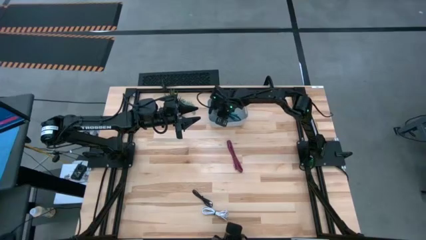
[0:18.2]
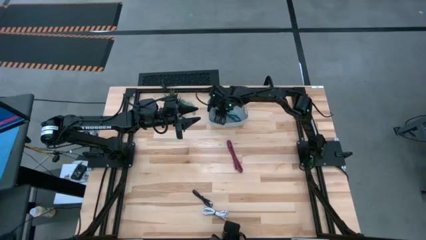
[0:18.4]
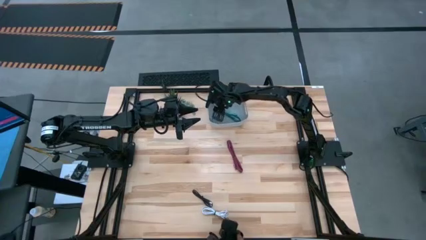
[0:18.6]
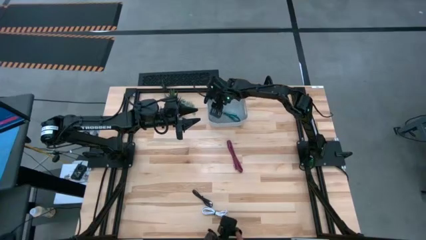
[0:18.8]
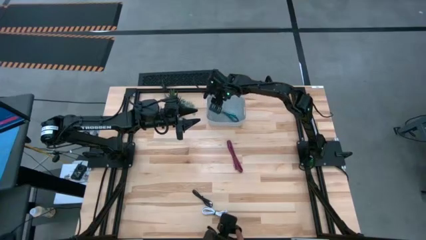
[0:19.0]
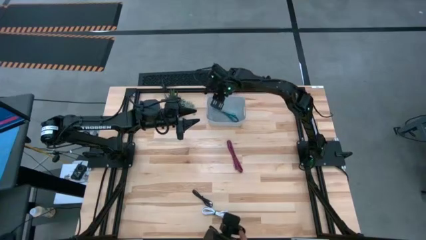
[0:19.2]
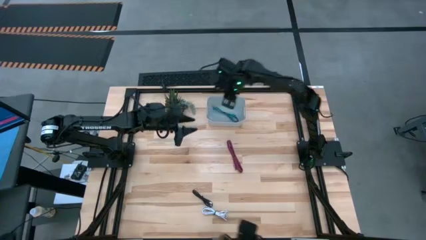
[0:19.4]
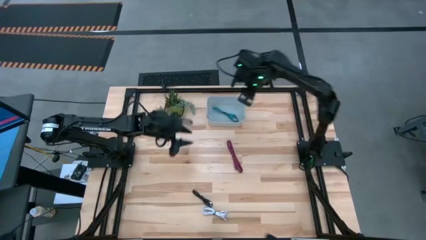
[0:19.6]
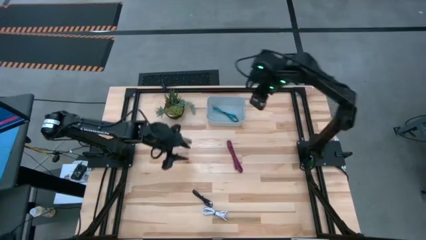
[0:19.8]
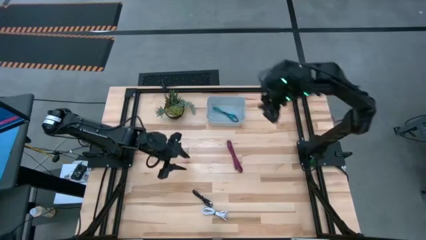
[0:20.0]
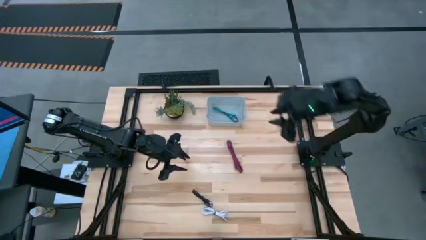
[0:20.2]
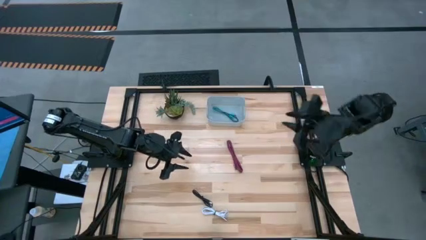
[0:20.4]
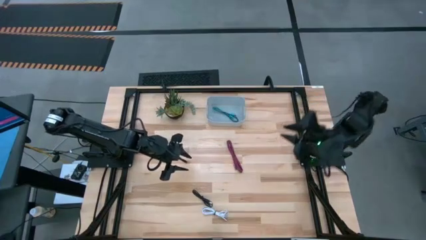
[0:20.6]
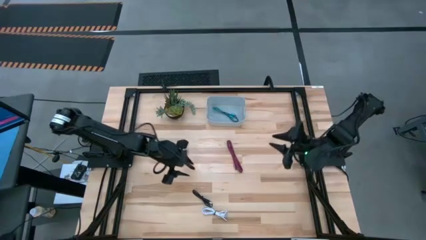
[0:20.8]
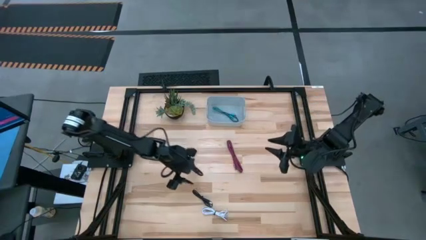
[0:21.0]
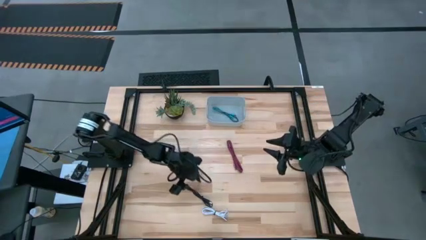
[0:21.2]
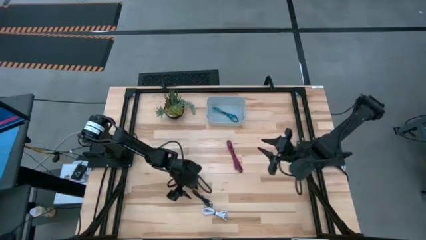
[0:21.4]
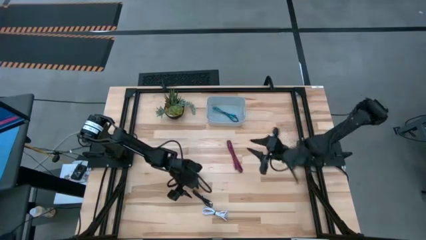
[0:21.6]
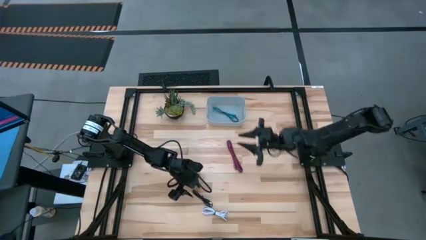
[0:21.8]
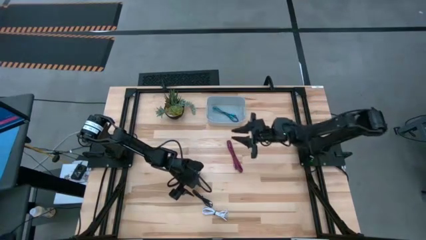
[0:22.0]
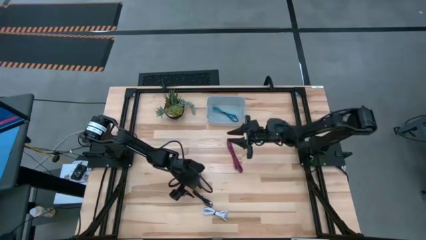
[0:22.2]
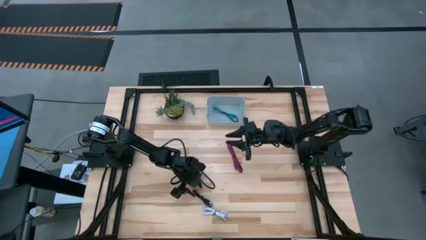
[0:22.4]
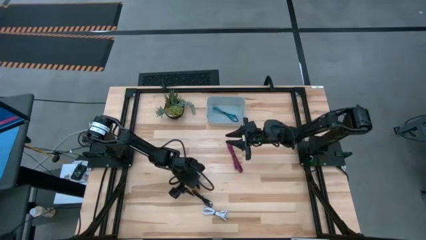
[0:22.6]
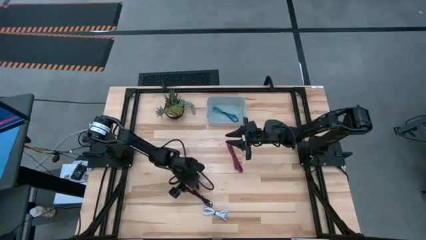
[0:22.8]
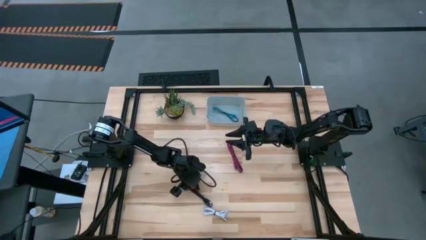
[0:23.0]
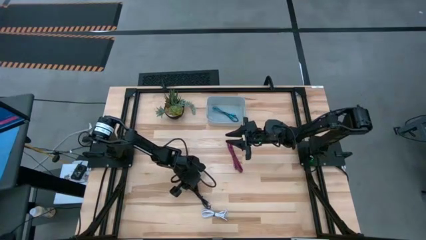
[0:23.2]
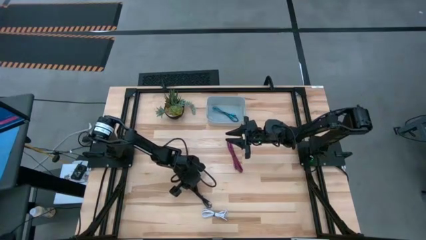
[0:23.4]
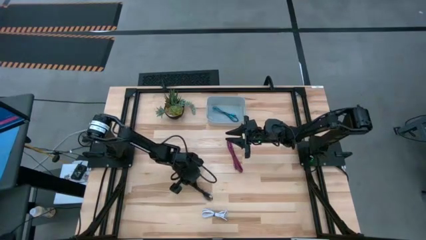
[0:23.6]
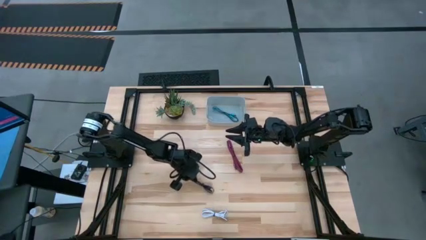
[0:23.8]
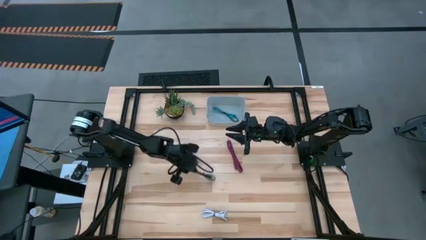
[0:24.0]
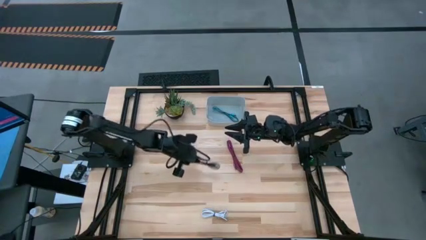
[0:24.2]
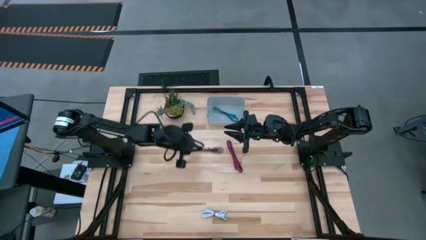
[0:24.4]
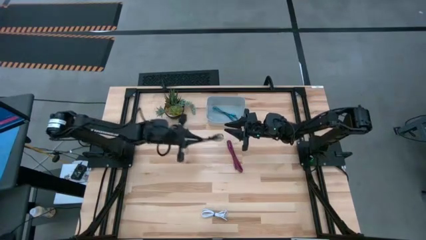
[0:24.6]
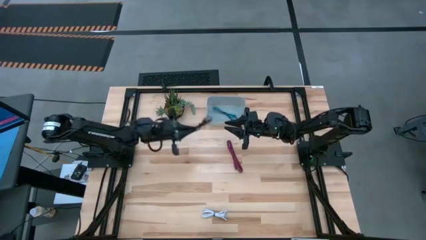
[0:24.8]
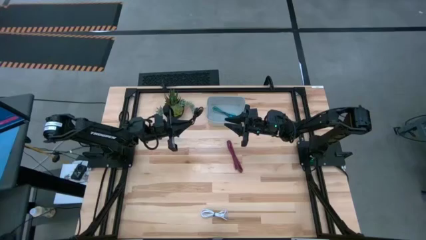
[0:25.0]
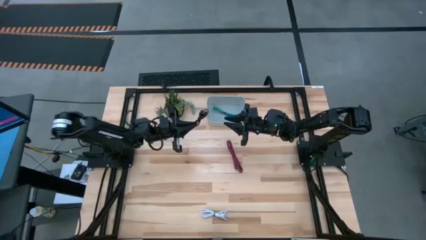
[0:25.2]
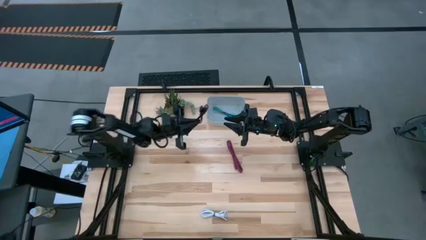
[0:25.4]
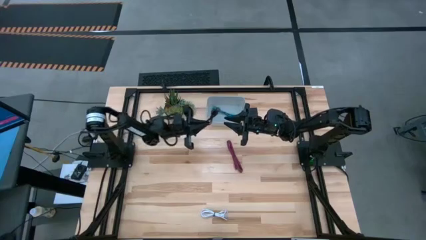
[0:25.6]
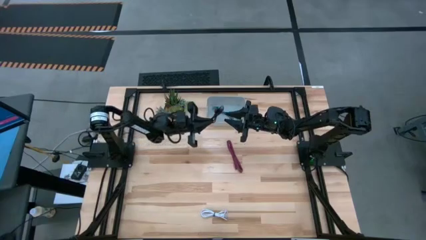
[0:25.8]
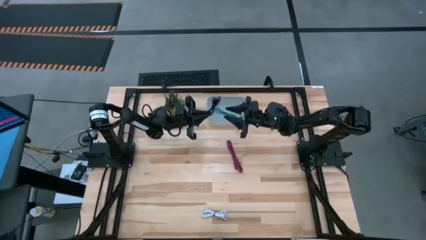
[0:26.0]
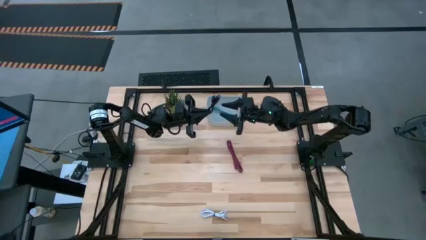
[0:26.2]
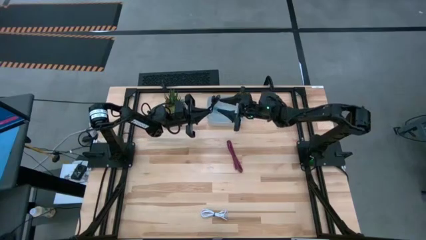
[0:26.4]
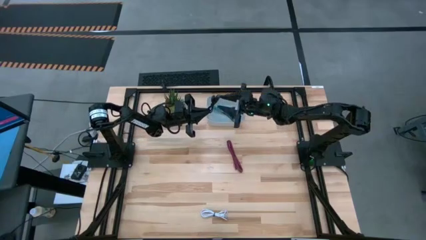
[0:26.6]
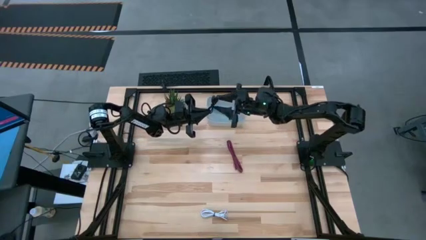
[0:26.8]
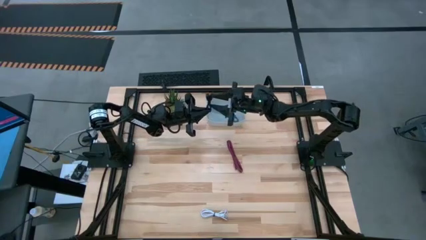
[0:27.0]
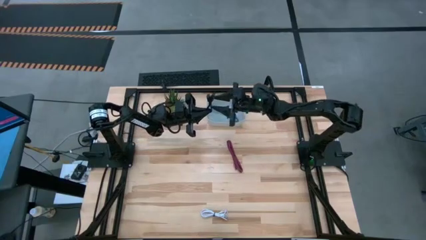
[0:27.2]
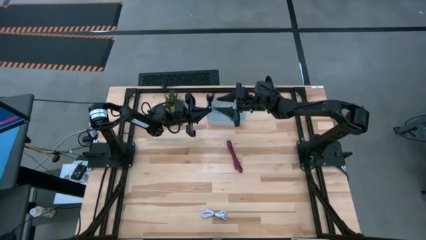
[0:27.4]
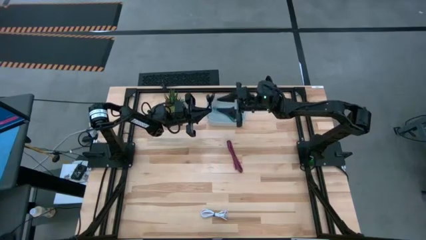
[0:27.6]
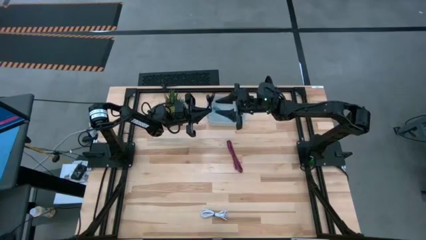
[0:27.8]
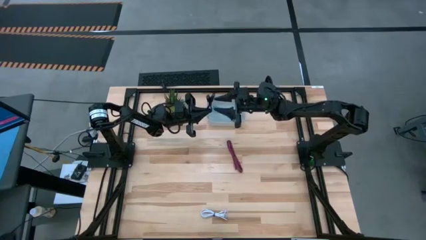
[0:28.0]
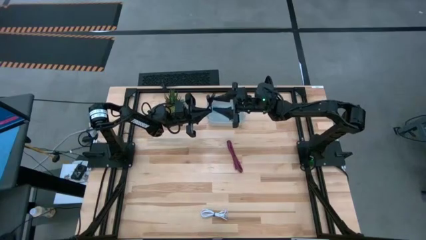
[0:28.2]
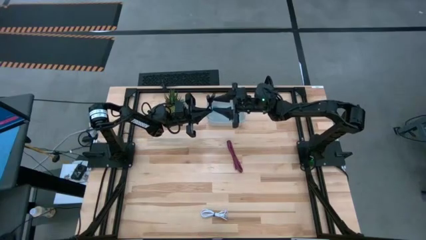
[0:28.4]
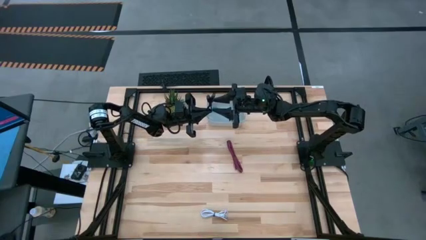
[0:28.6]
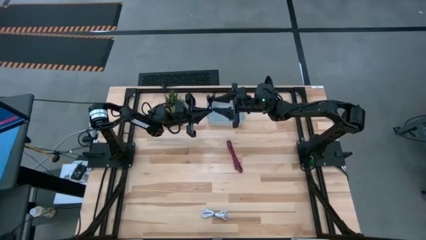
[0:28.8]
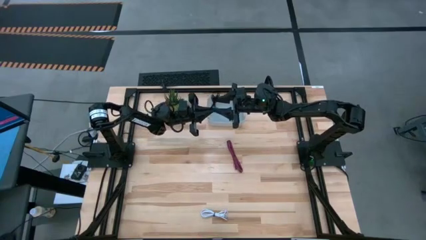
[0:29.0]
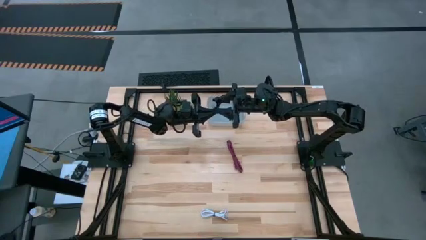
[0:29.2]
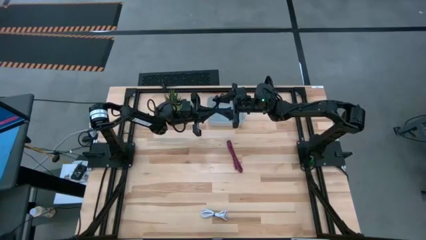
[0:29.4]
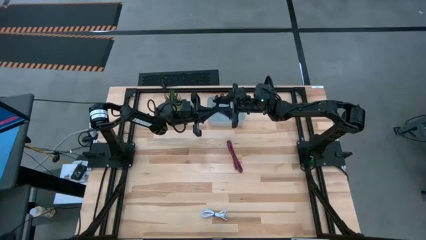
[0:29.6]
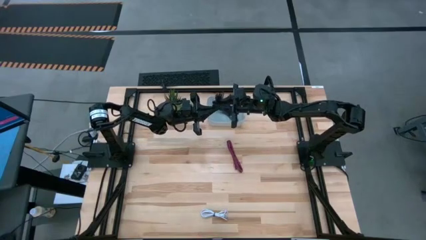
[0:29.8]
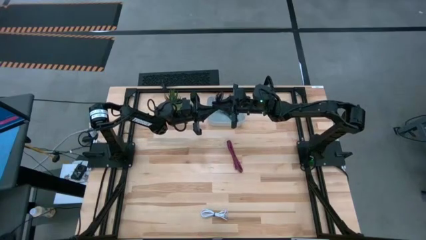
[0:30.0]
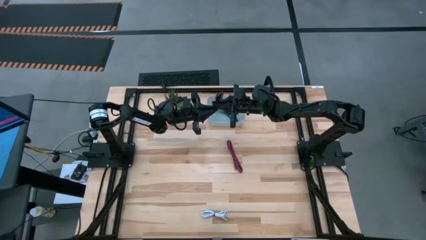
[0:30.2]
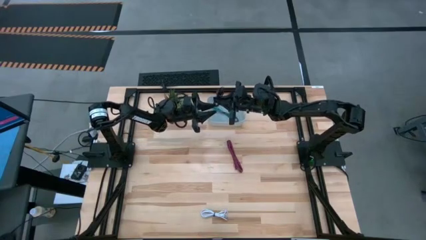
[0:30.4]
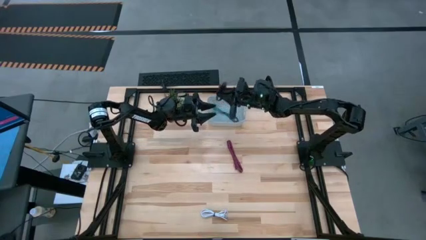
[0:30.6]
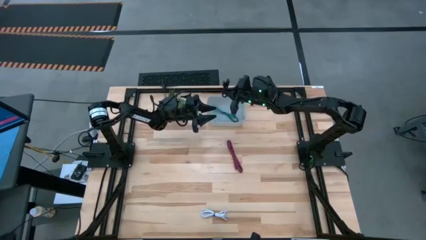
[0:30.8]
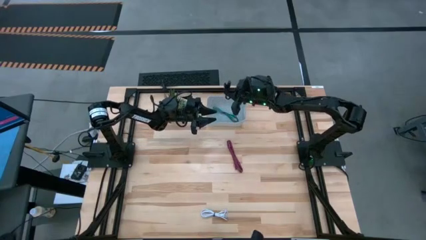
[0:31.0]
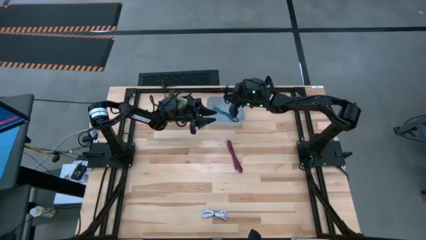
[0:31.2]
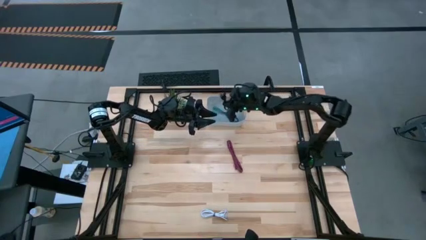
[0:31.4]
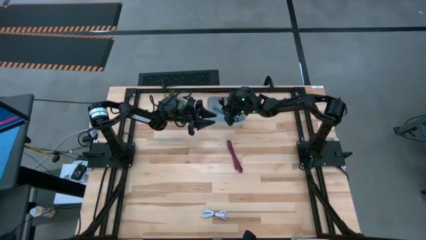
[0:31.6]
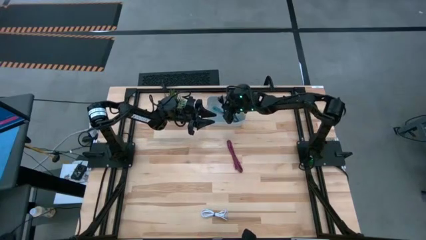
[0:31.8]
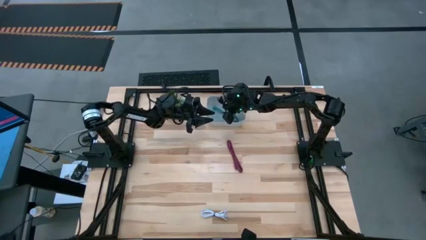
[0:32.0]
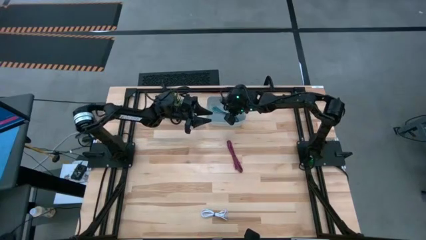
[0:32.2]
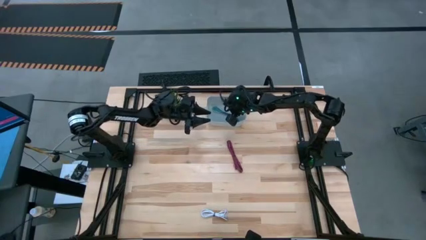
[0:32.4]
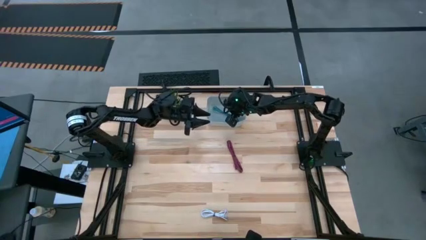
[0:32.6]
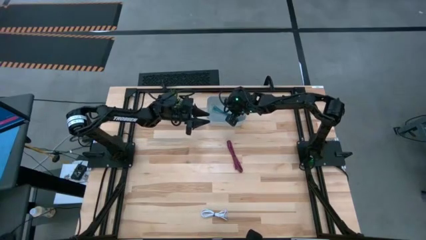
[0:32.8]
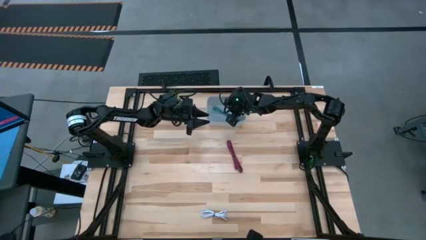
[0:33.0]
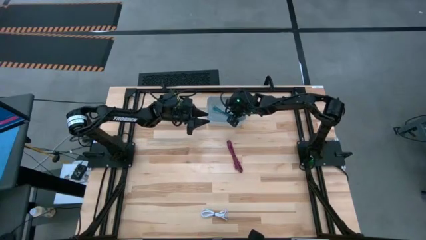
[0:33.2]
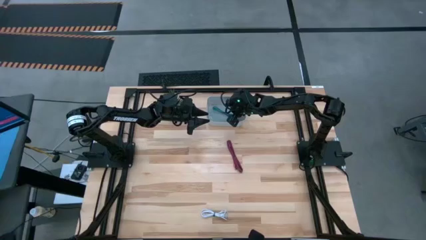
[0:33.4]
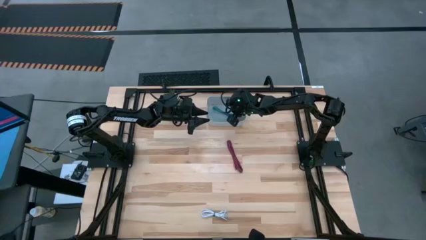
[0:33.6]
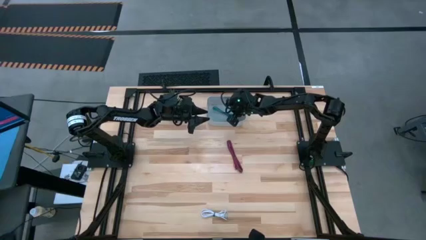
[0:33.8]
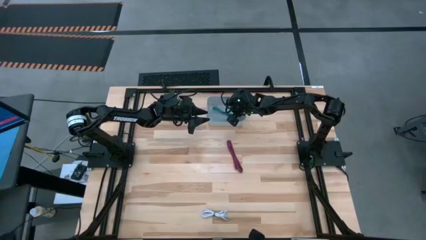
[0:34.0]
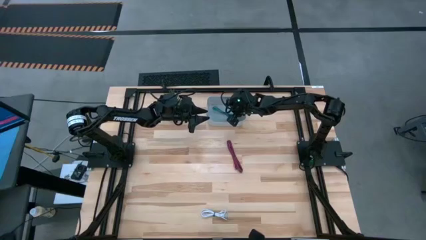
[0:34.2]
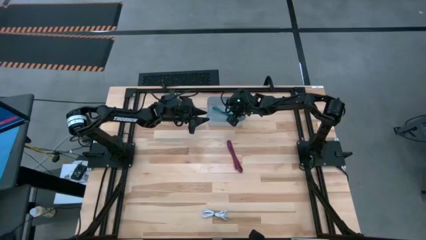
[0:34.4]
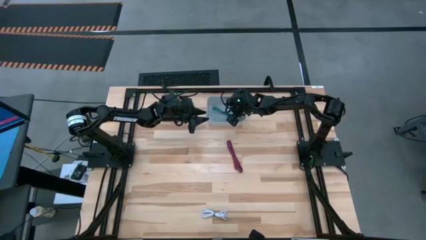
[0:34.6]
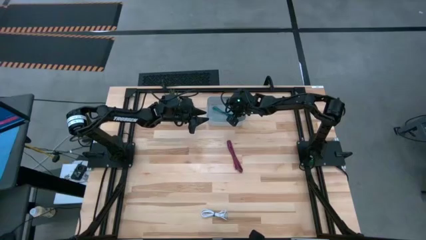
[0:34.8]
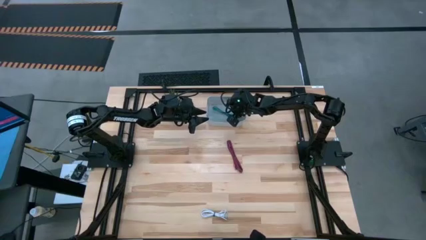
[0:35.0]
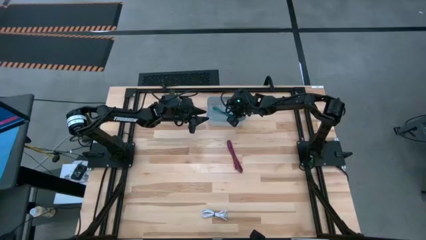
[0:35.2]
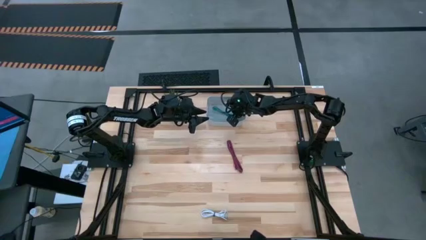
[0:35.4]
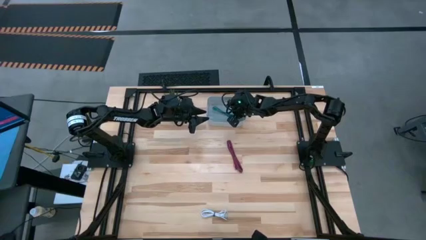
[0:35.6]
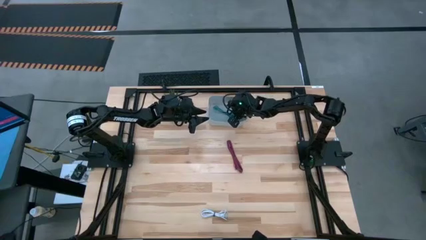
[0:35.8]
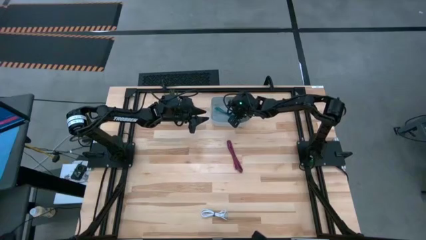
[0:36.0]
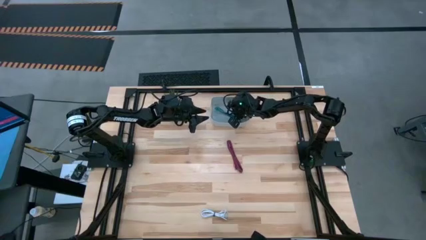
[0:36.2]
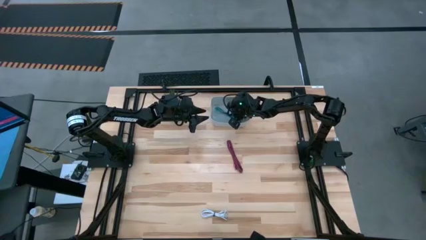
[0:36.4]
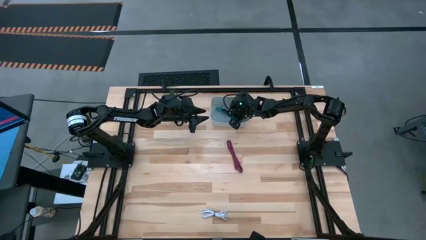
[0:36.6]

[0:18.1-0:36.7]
Task: Pick and place USB-C Cables
Put the black charger cable into the white bin
